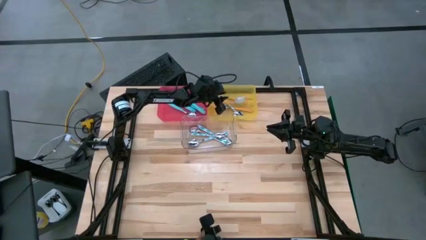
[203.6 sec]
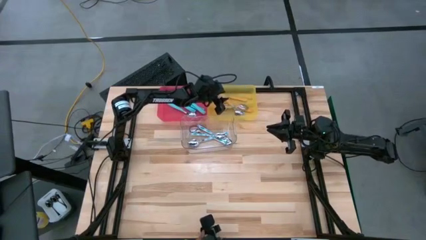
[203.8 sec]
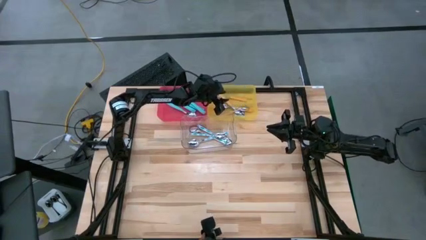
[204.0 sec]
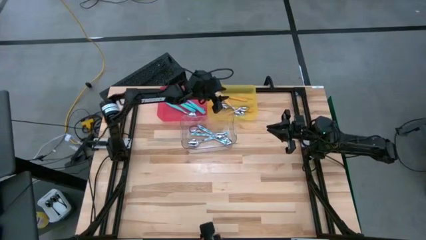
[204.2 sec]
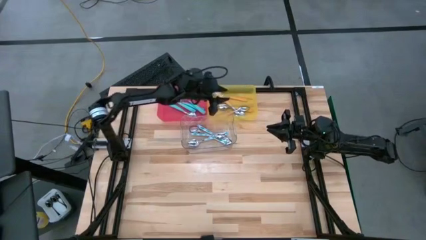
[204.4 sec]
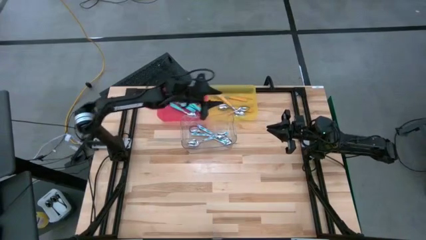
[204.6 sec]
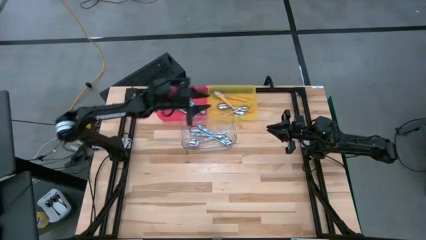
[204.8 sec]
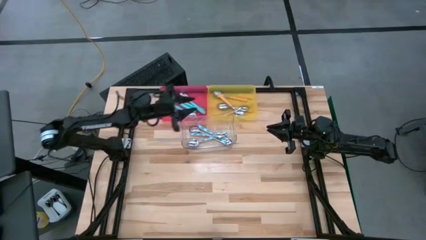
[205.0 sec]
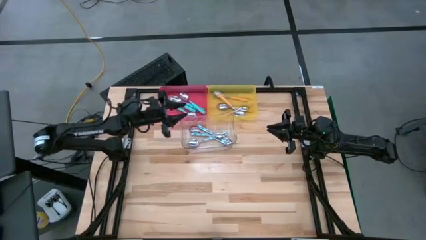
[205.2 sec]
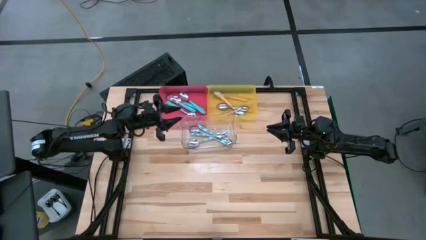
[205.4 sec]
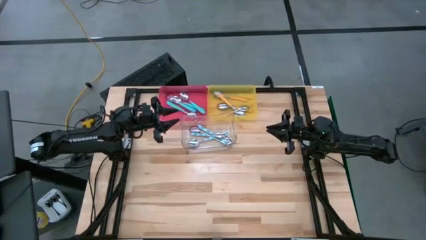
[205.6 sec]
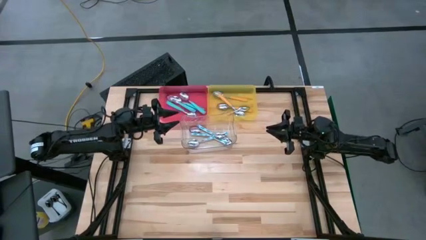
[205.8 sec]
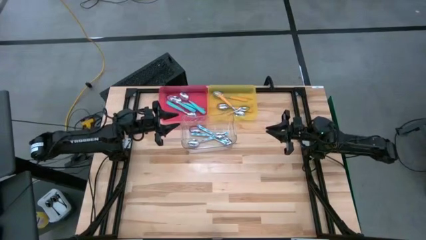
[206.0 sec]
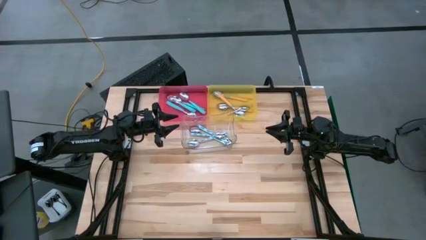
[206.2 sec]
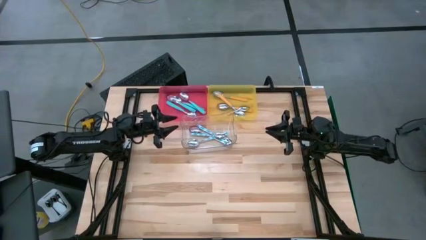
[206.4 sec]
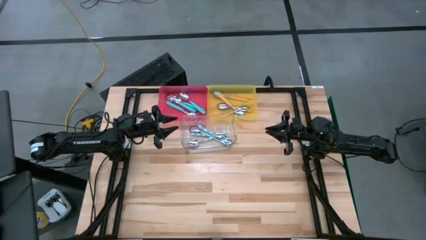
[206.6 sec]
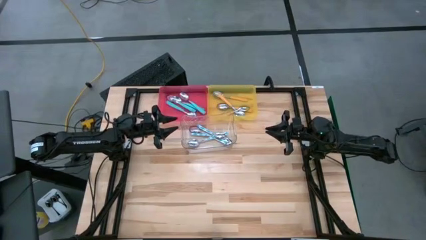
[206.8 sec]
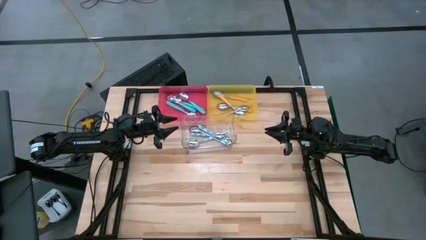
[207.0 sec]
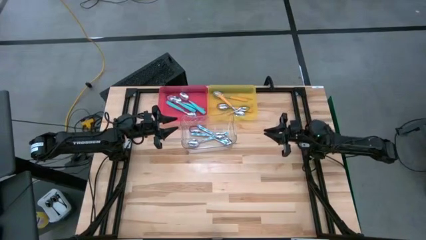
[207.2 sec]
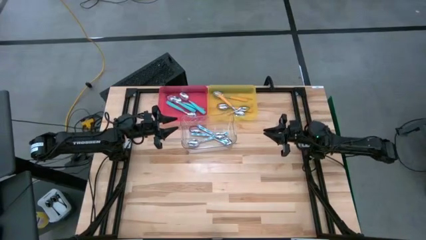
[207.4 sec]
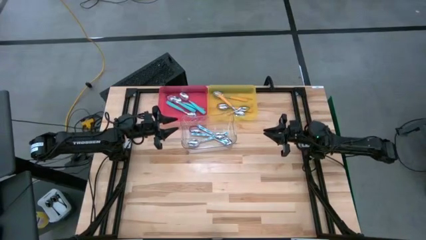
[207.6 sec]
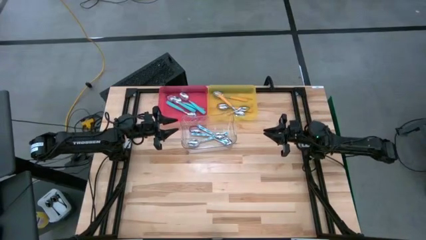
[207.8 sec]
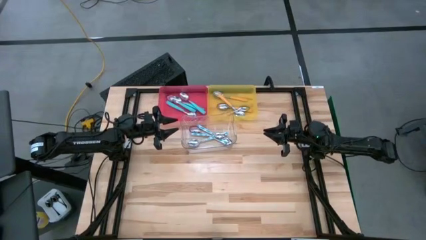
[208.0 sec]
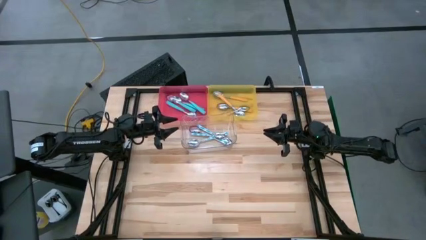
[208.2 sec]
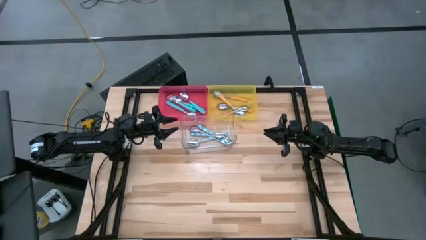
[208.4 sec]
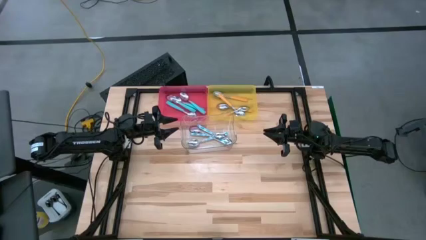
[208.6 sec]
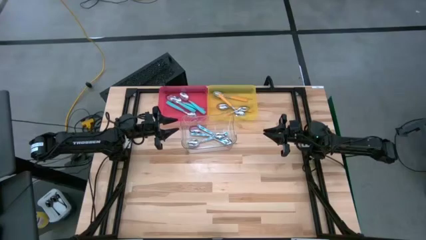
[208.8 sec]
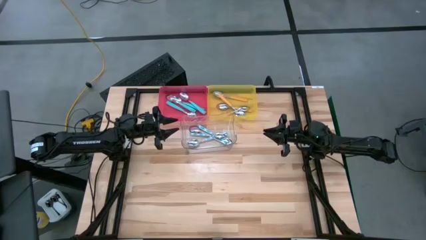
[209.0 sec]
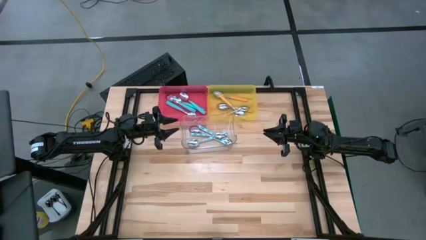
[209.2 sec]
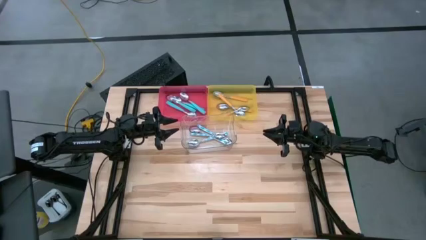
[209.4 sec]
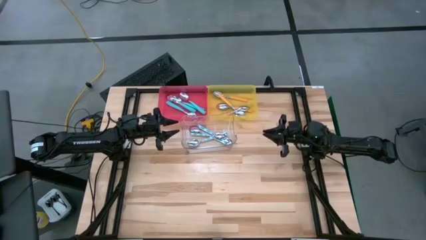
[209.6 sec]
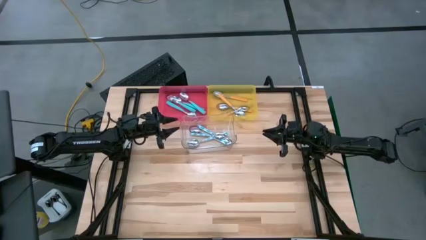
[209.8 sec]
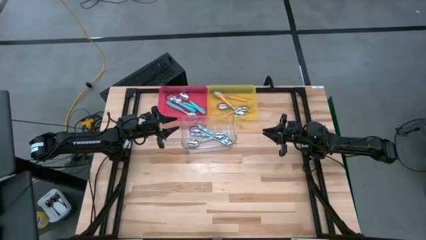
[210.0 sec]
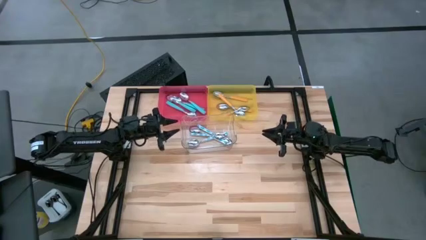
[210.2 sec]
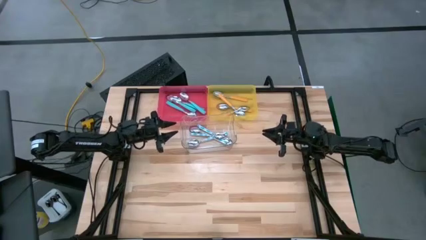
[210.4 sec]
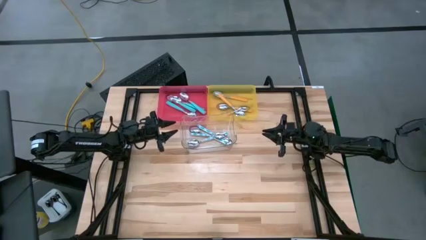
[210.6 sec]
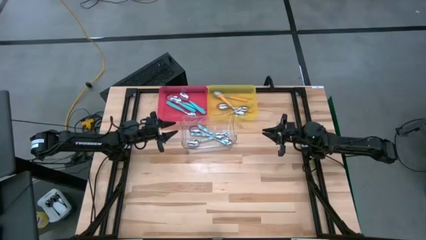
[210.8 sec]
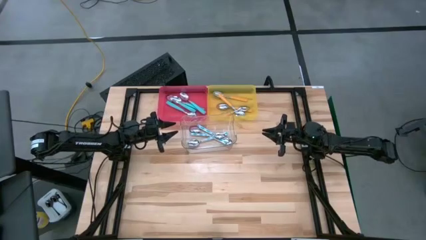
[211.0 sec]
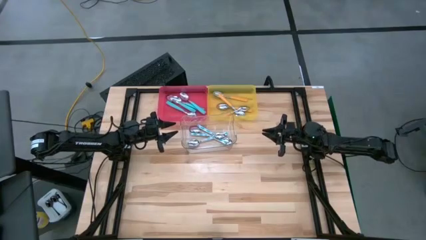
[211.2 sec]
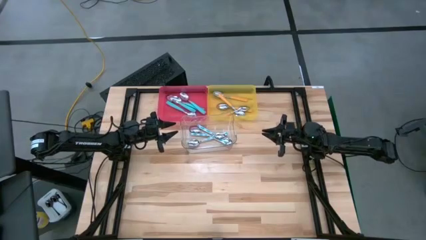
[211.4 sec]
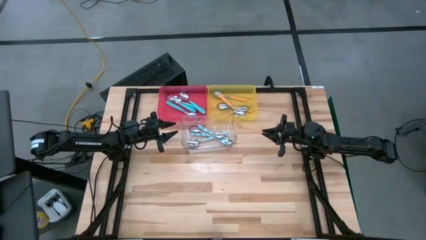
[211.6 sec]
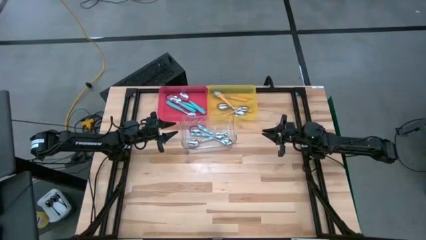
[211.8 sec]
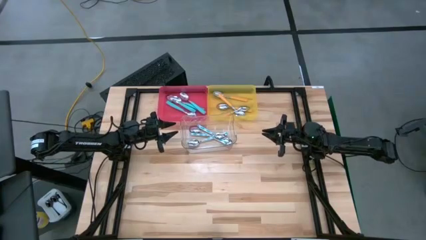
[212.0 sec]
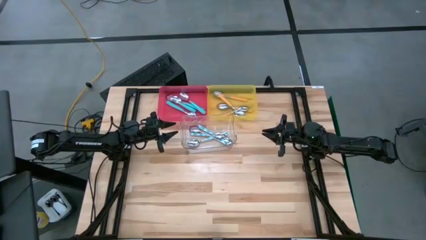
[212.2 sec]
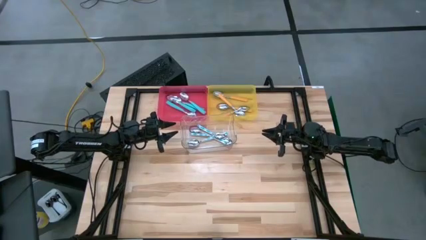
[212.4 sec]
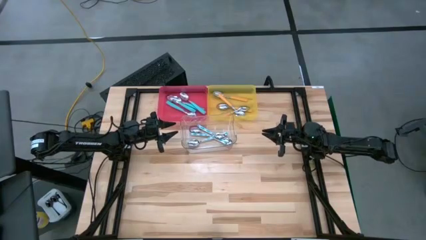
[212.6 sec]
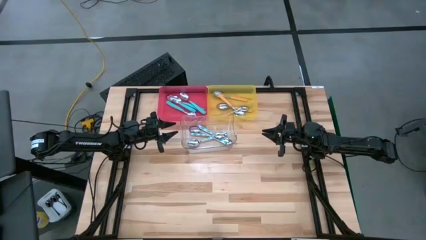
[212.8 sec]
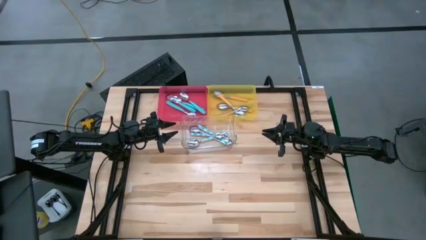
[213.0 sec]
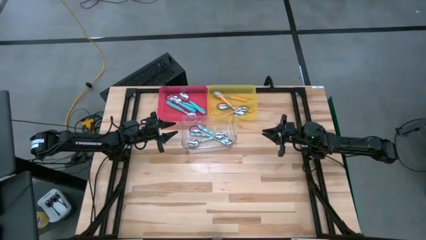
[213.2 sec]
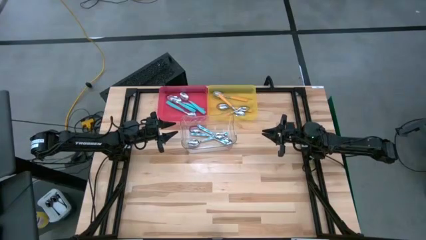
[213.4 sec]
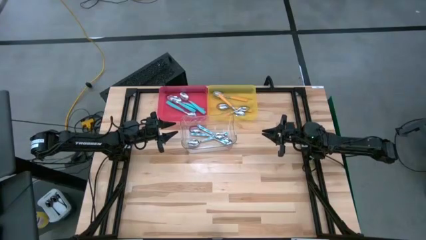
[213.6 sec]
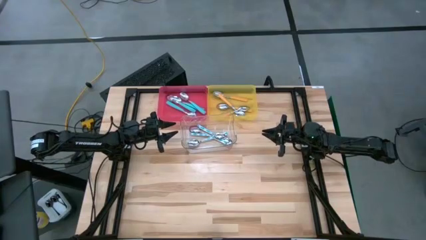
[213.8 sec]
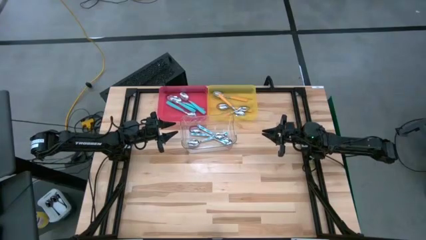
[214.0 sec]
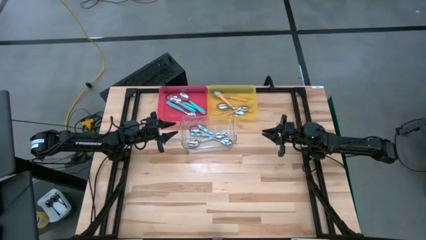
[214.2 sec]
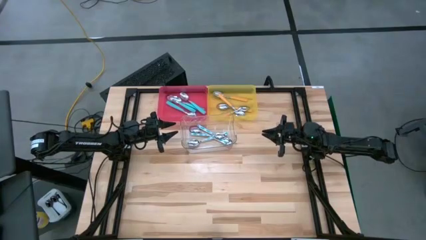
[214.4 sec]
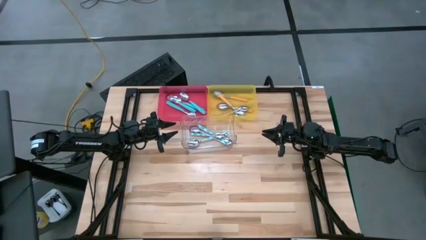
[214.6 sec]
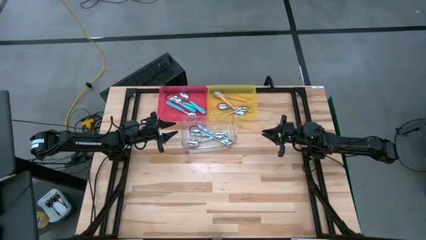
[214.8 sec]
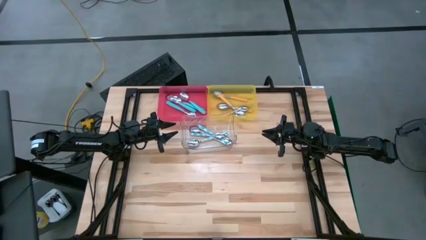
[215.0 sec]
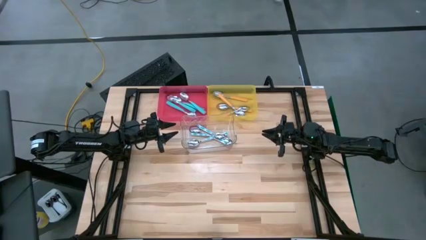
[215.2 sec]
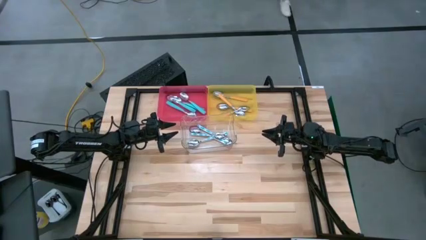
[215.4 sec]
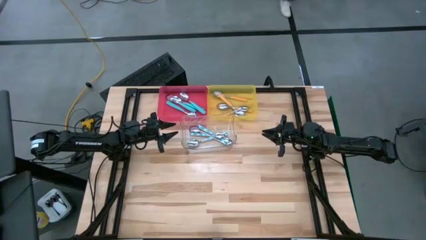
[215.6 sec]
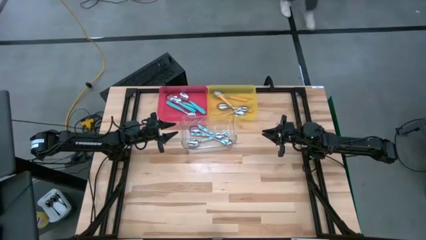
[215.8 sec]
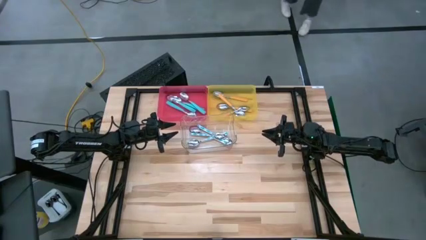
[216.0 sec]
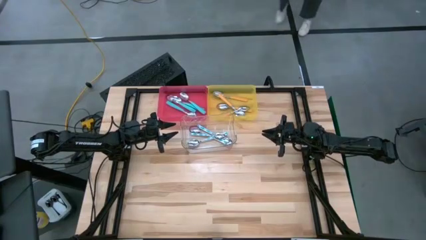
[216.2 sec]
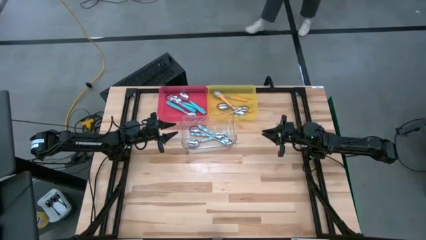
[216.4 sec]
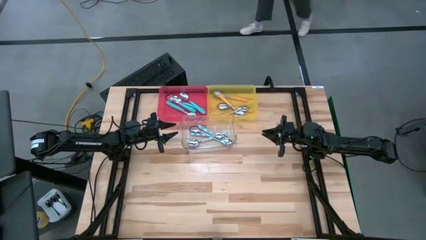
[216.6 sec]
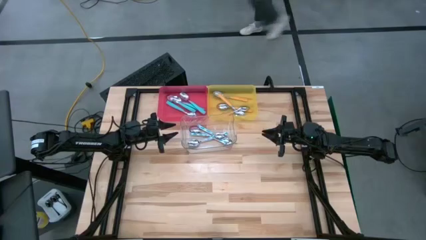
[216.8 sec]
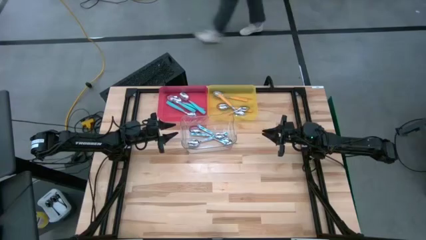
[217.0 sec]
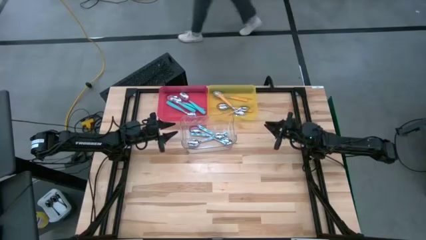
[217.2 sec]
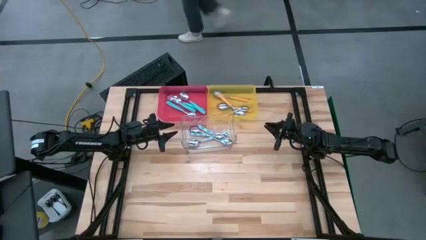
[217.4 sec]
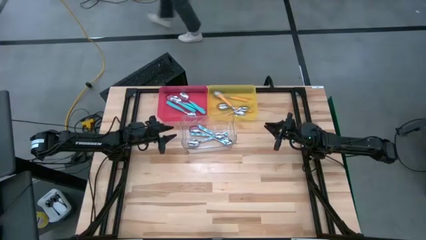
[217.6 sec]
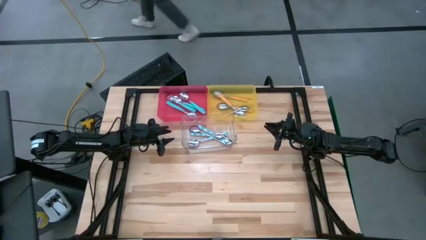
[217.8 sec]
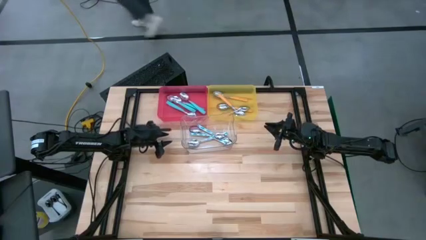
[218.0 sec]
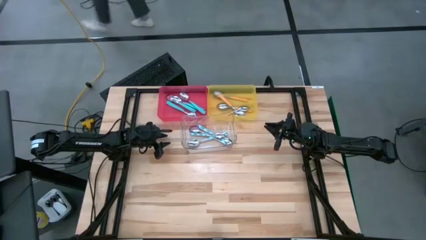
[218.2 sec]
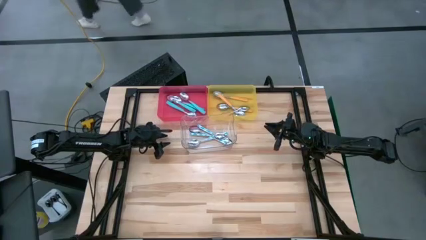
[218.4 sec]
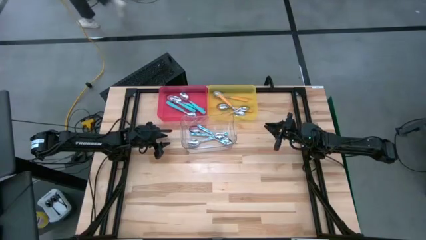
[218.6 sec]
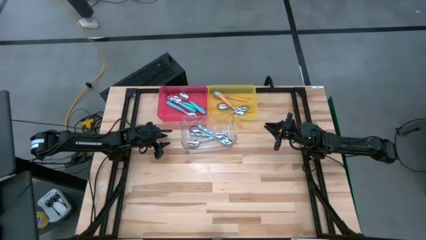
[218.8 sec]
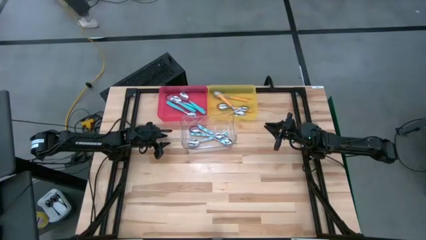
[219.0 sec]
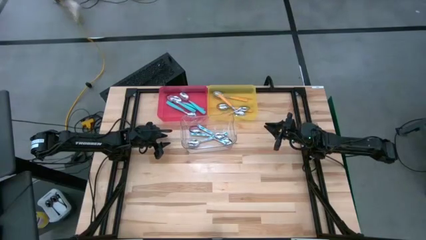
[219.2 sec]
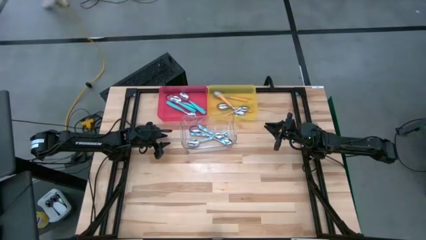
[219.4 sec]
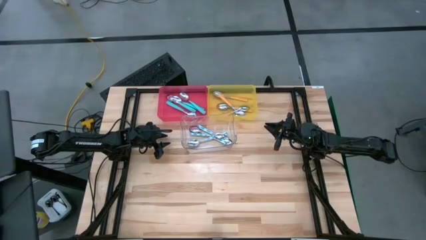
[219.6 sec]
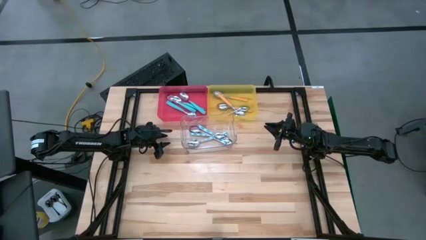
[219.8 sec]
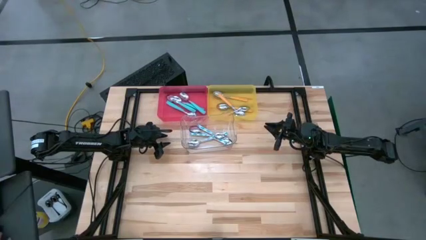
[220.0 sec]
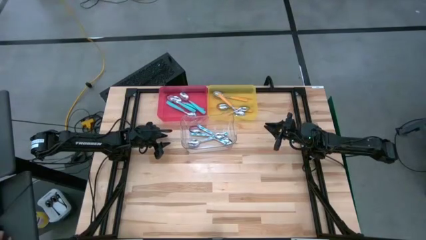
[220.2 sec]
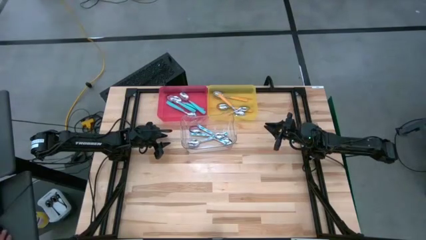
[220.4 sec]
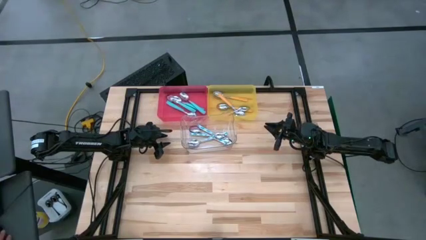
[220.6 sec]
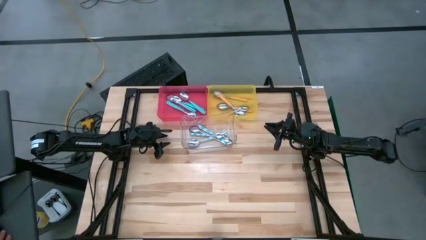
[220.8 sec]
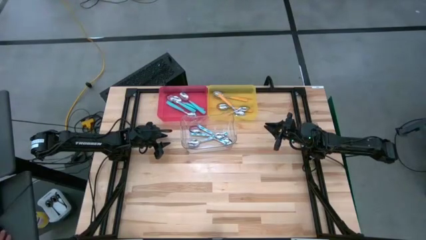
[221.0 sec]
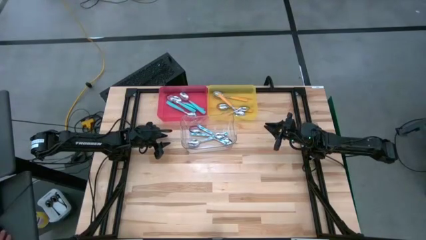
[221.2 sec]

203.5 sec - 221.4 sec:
Task: Sort silverware by color (type)
Return to Home Position
